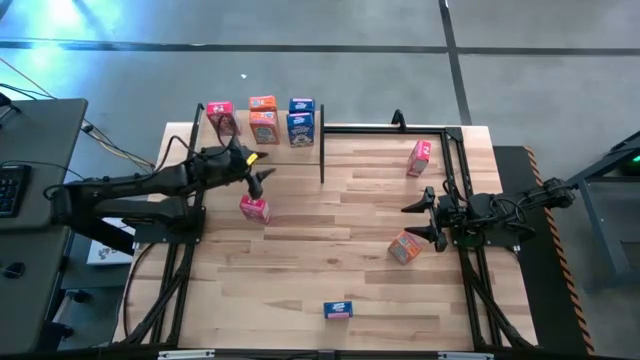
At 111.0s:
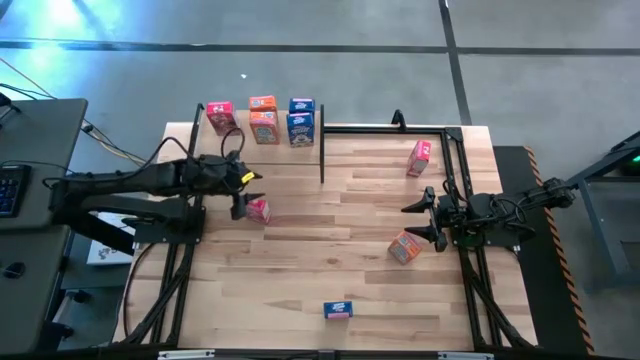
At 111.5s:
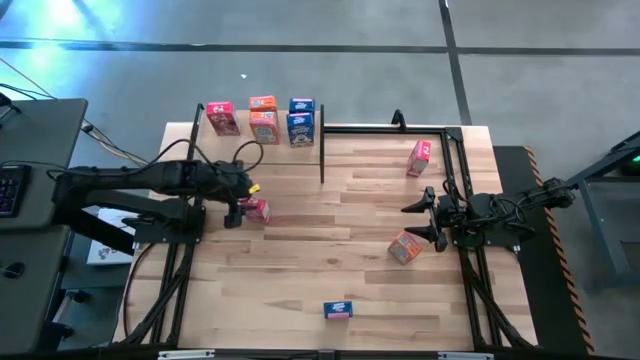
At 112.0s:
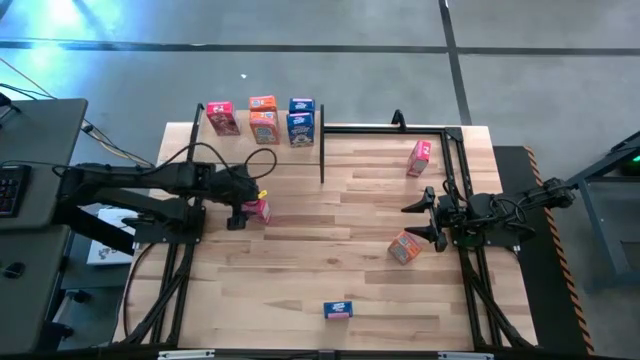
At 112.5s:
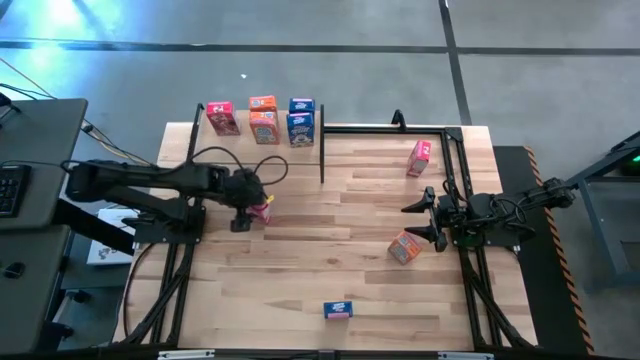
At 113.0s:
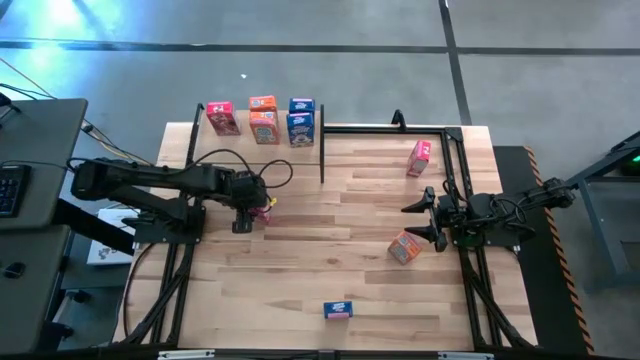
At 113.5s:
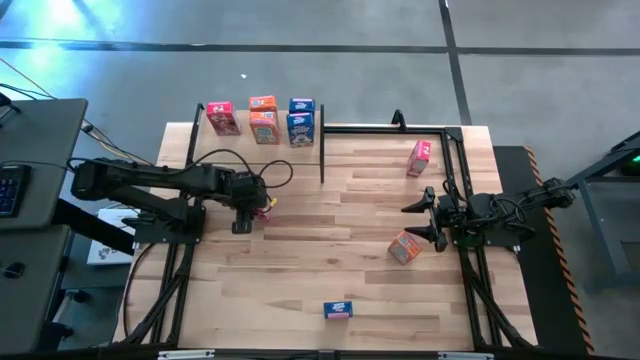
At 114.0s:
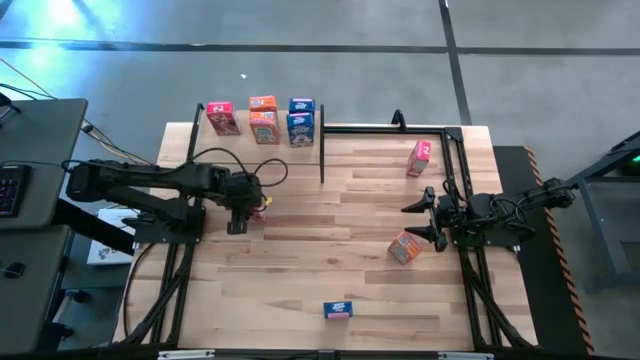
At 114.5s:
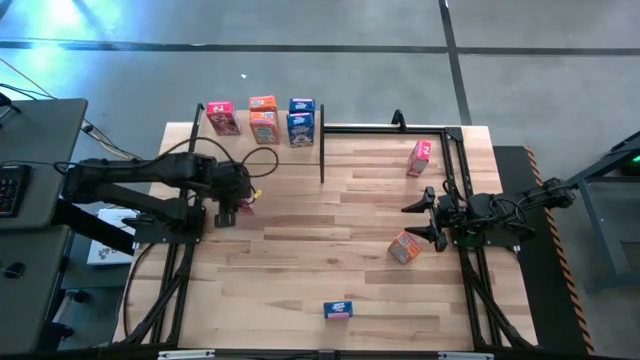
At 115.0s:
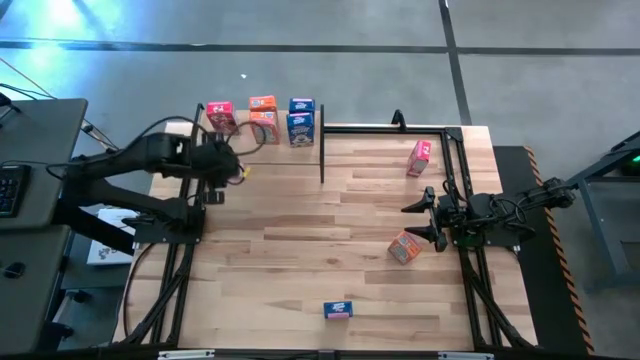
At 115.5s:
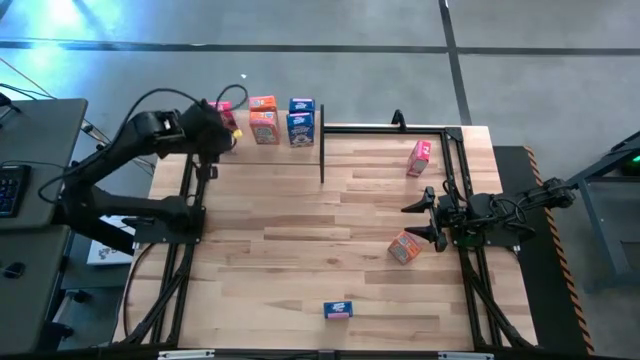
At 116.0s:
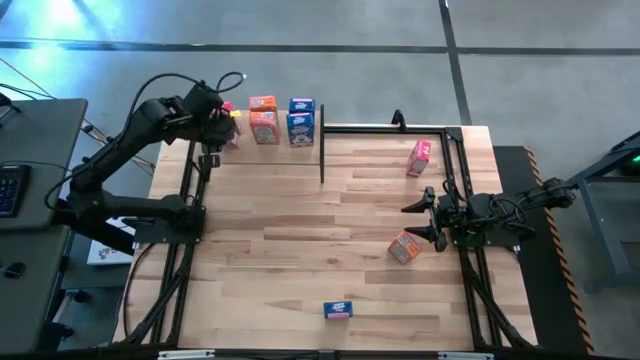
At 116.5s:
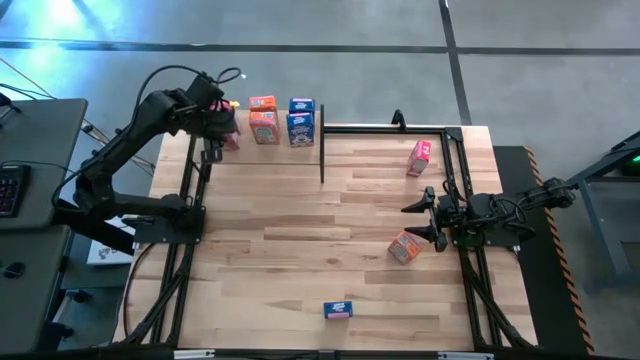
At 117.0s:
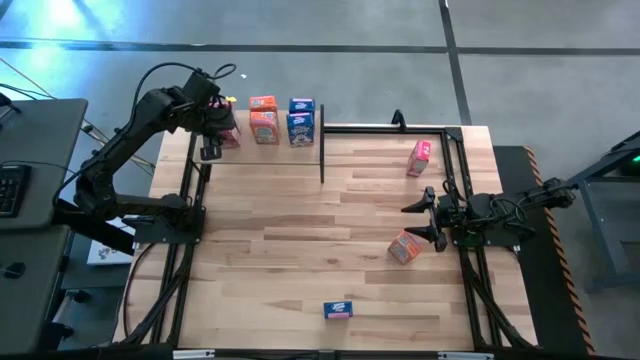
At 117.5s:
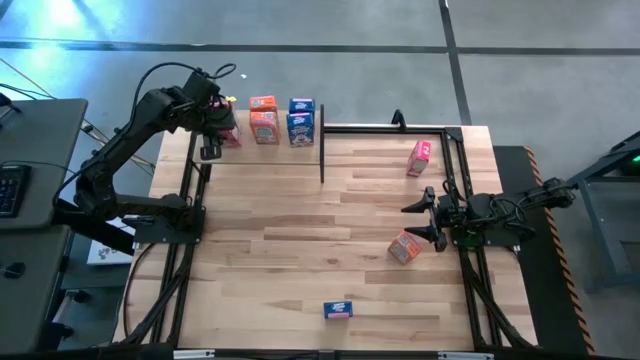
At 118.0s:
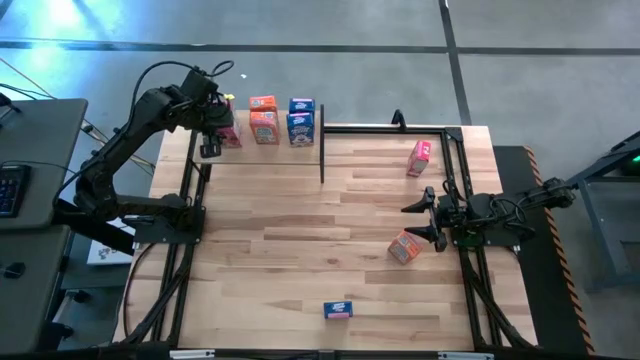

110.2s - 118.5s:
Task: Stack cereal on shelf
Put the left red cereal box on the the shelf aligned with the other red cereal box

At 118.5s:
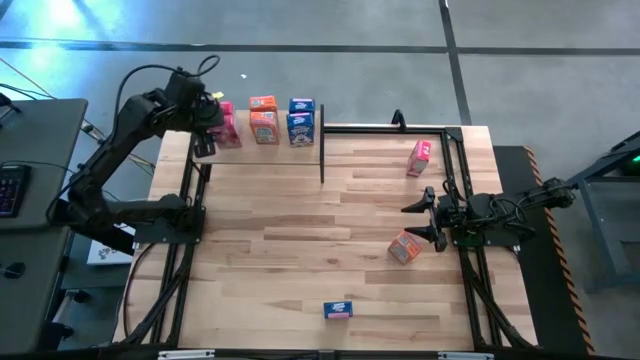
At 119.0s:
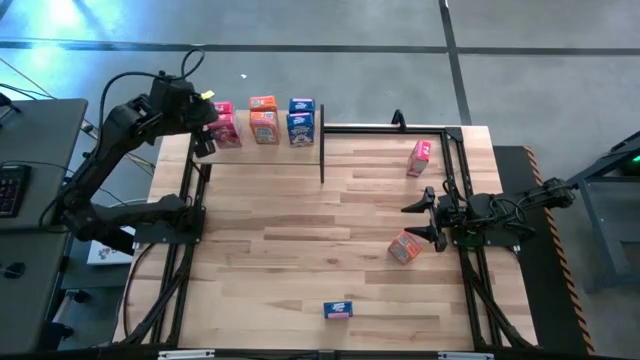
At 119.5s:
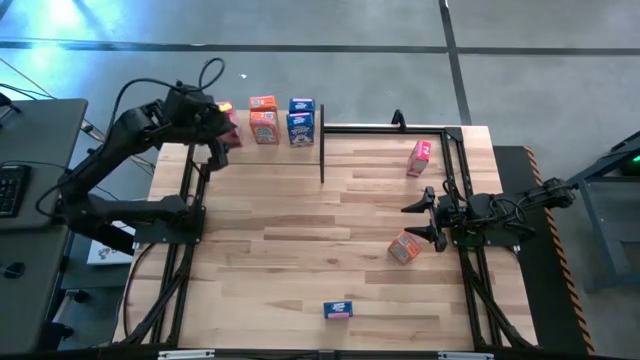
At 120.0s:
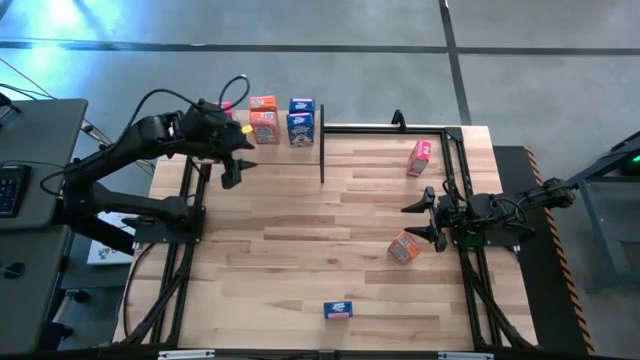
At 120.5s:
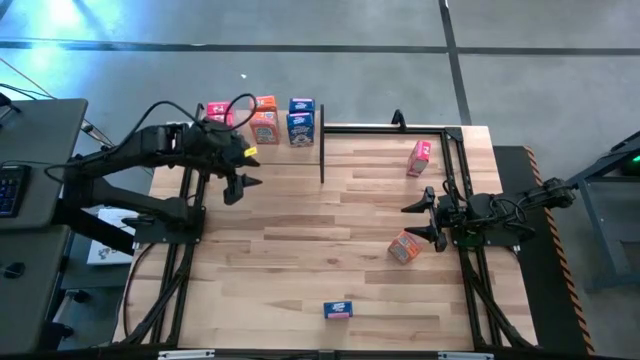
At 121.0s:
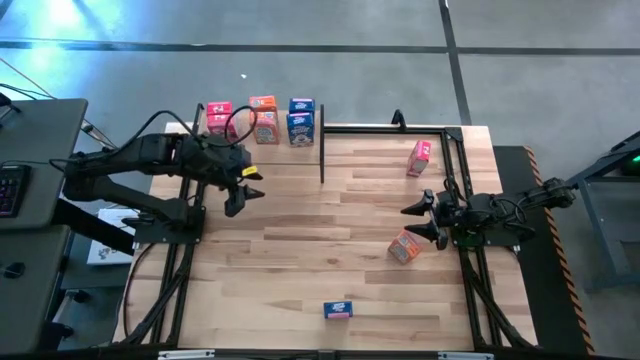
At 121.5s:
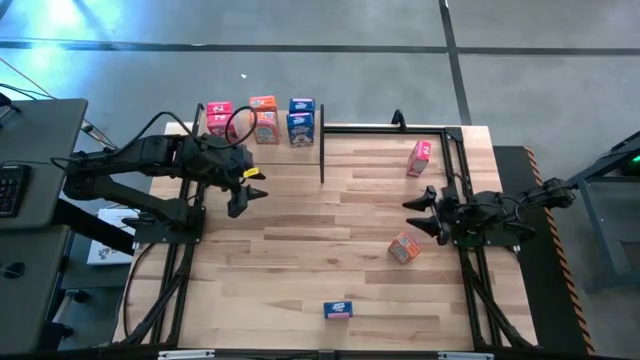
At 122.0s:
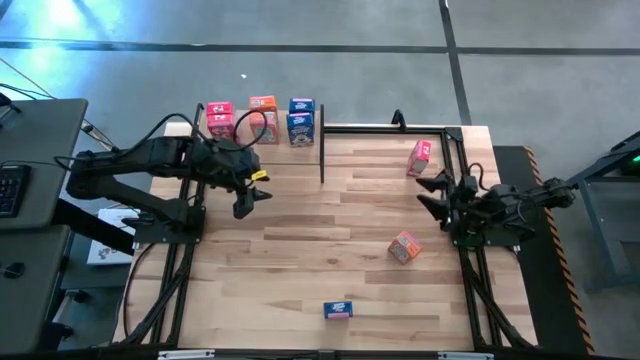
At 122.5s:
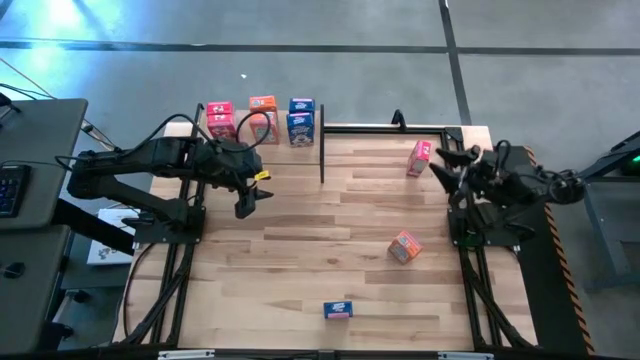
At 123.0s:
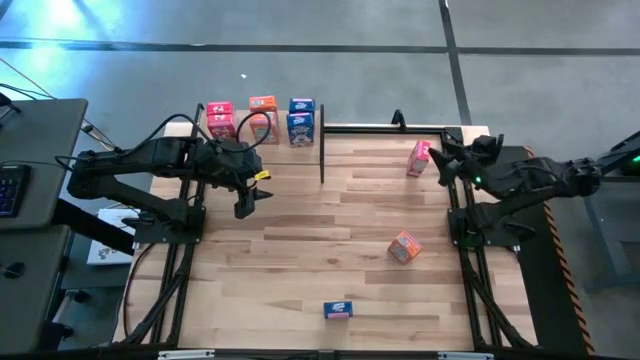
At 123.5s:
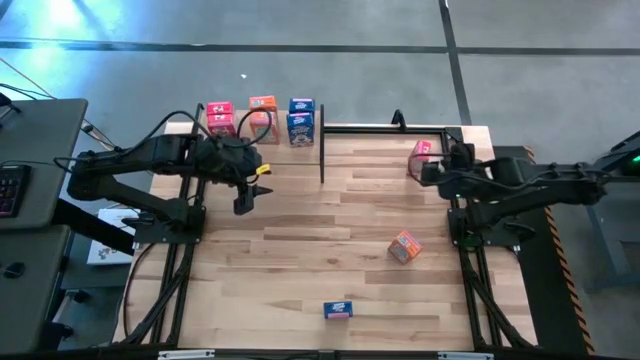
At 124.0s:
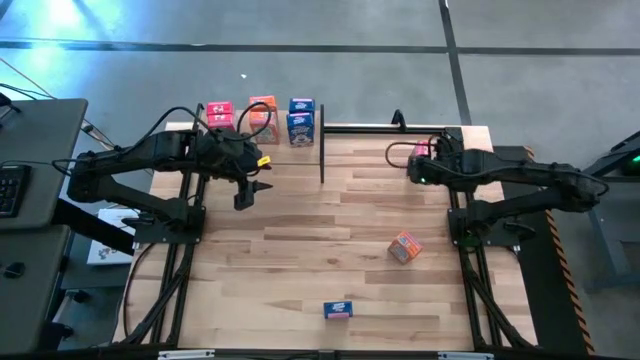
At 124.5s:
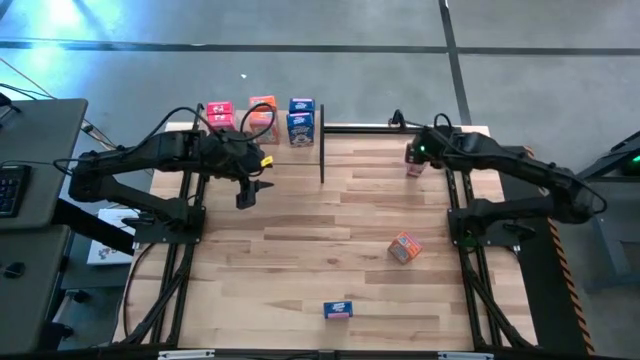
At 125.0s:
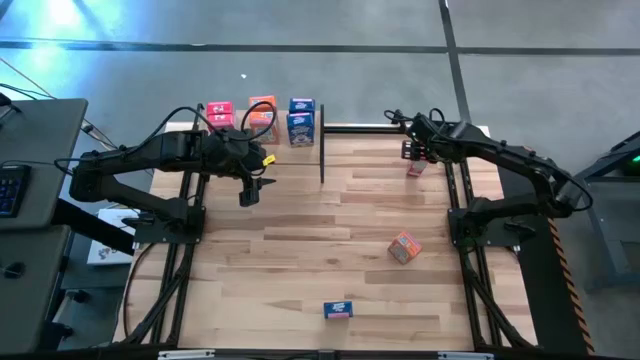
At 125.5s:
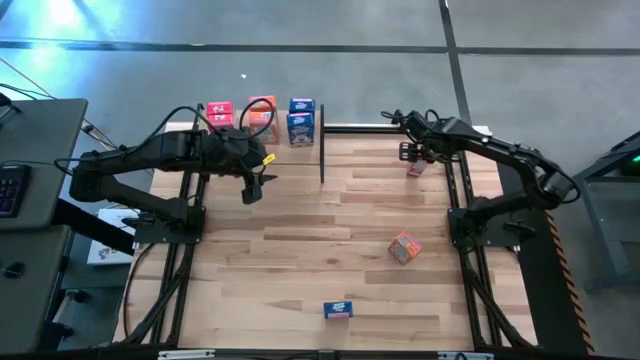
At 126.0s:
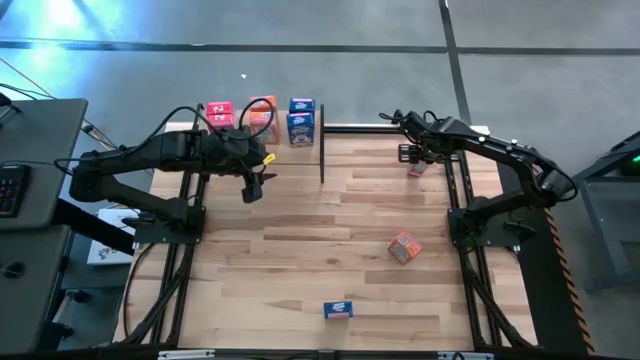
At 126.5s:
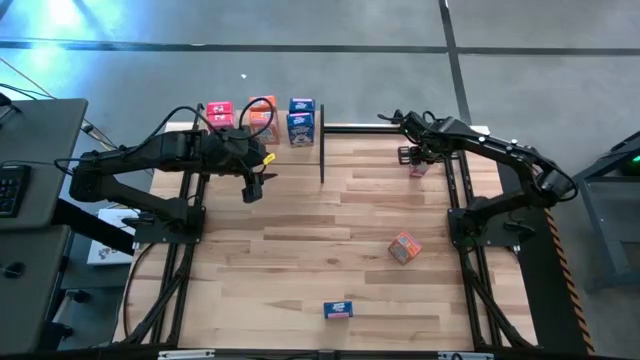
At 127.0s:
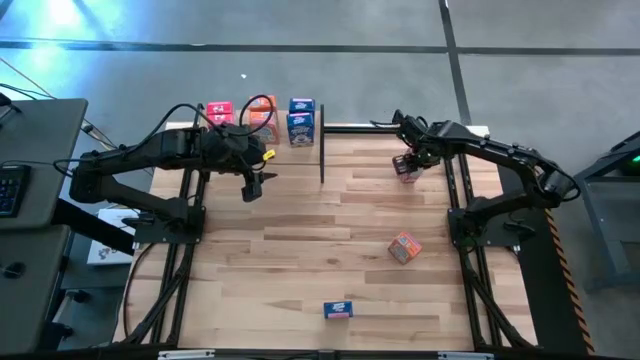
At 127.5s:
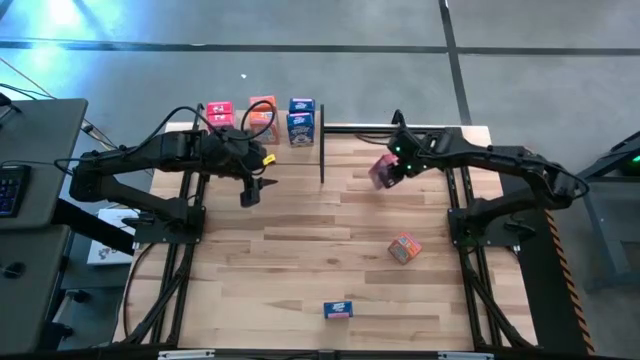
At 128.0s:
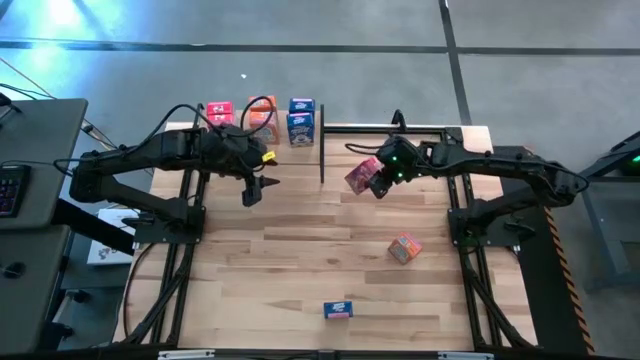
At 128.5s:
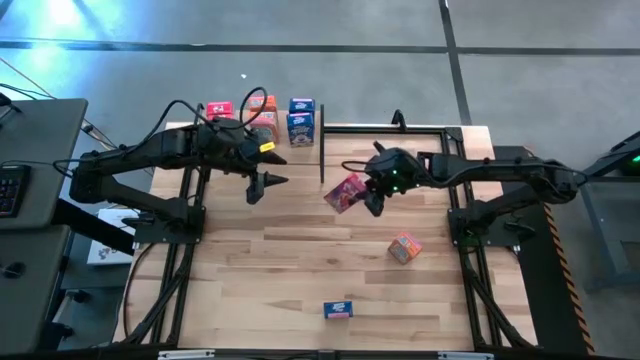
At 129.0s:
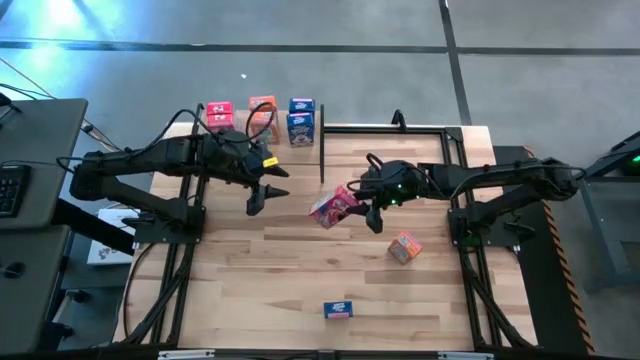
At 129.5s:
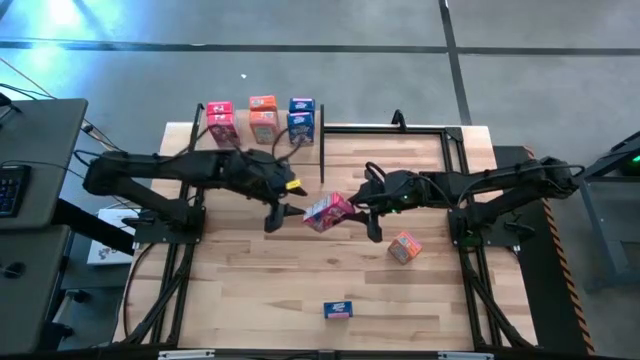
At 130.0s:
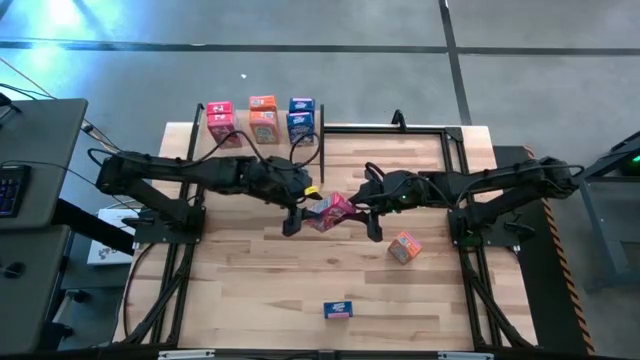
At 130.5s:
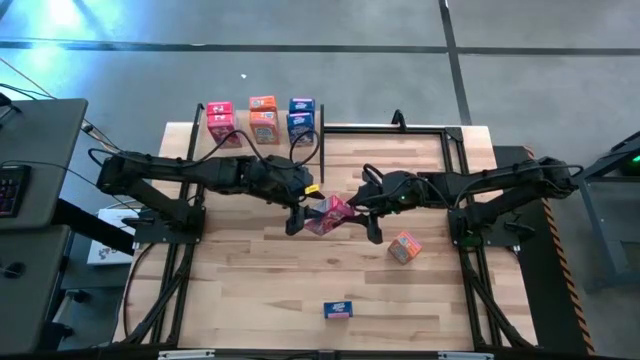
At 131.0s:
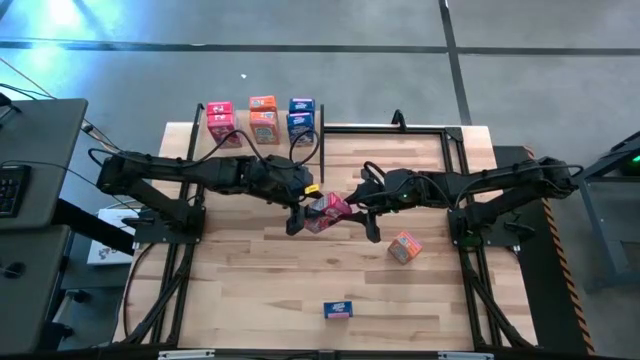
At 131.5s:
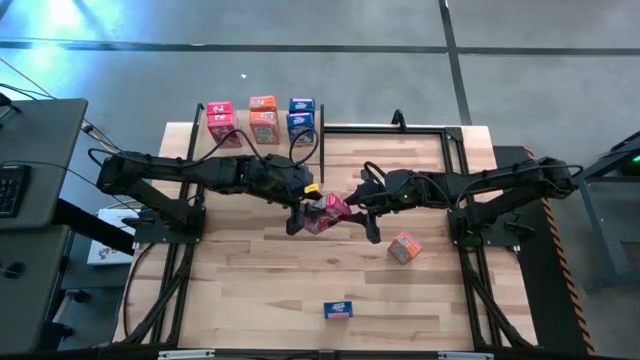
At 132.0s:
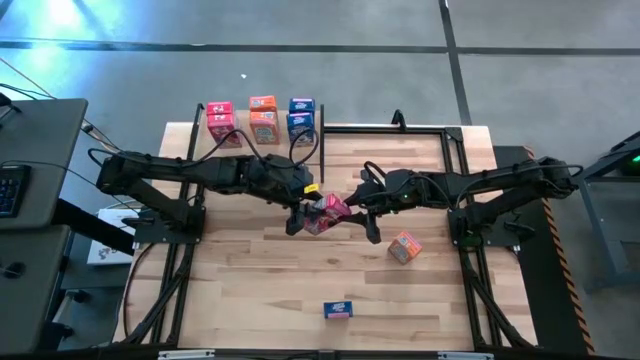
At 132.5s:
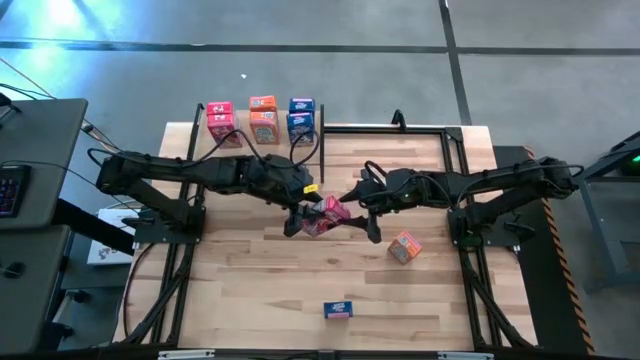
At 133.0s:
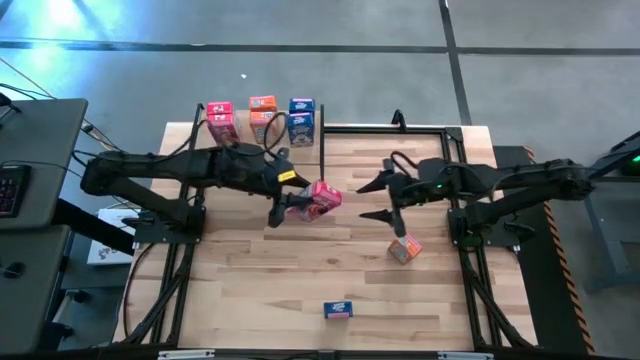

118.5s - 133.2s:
Put the red cereal box on the the shelf aligned with the other red cereal boxes
